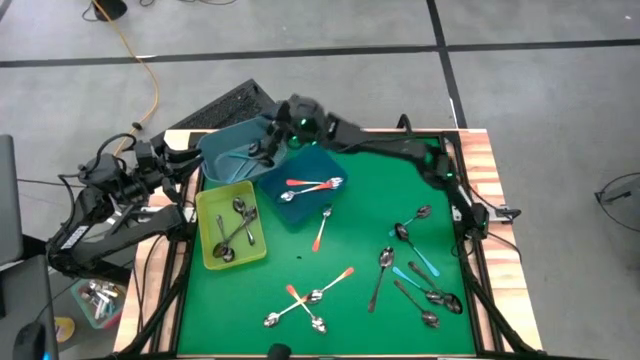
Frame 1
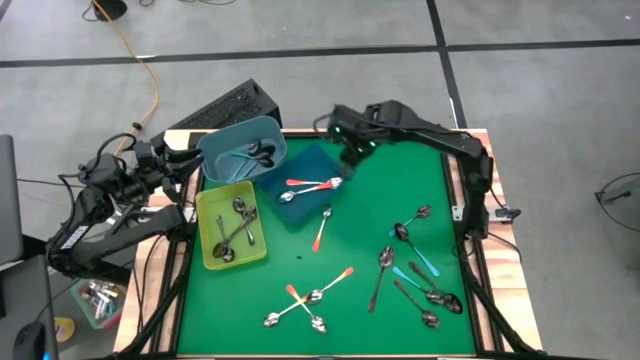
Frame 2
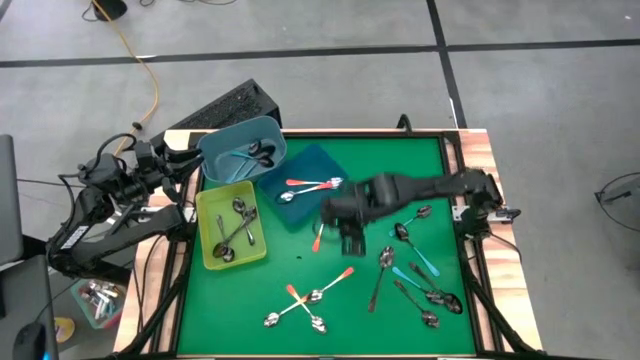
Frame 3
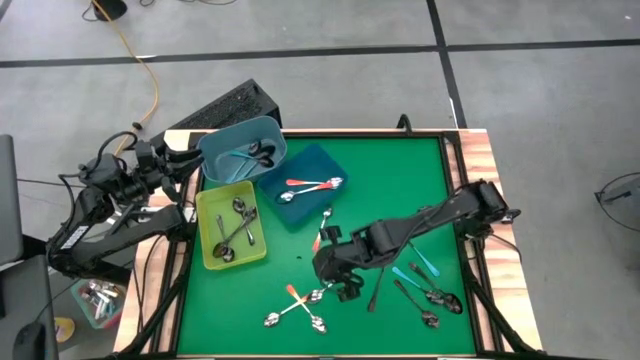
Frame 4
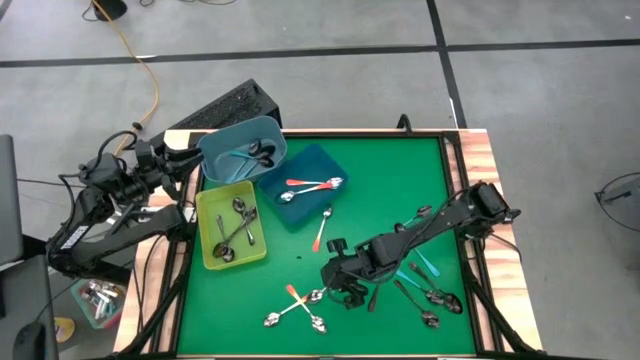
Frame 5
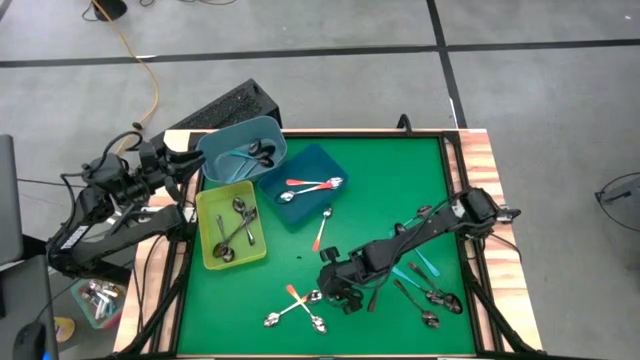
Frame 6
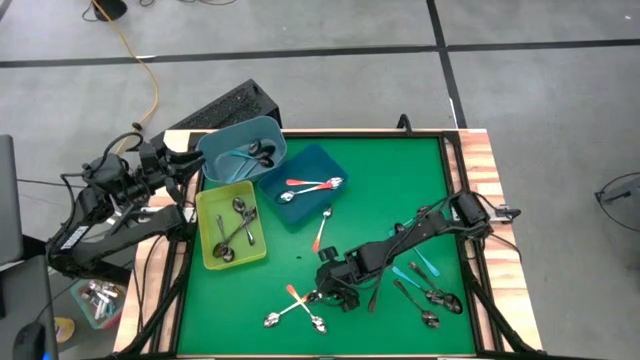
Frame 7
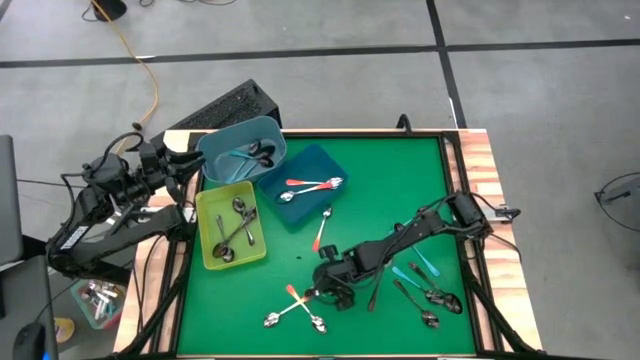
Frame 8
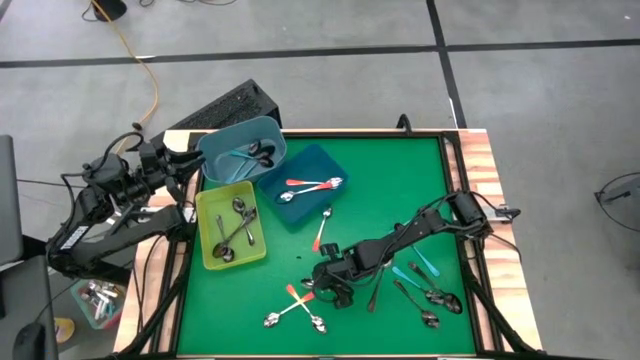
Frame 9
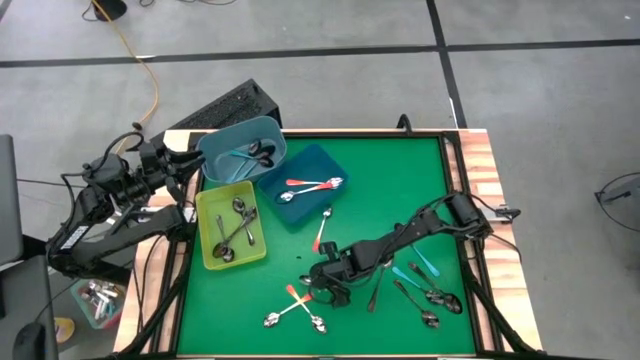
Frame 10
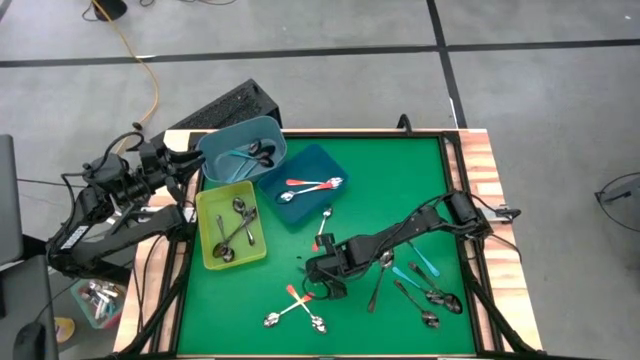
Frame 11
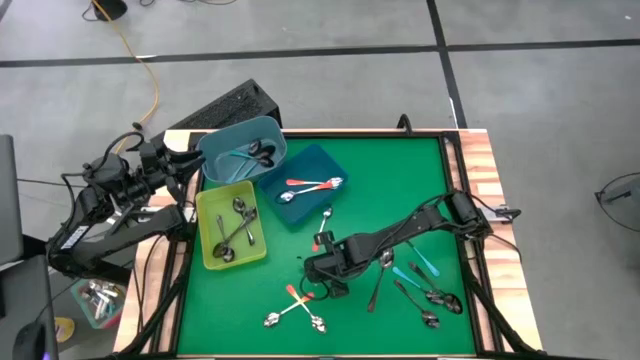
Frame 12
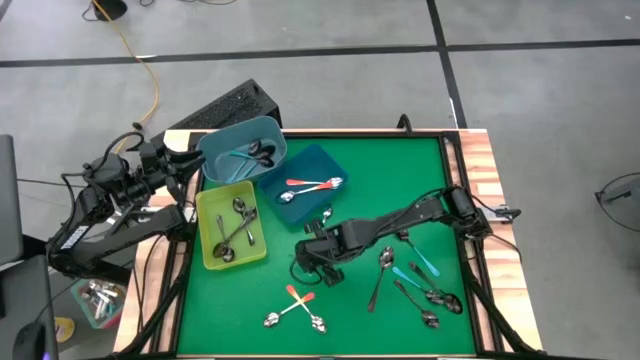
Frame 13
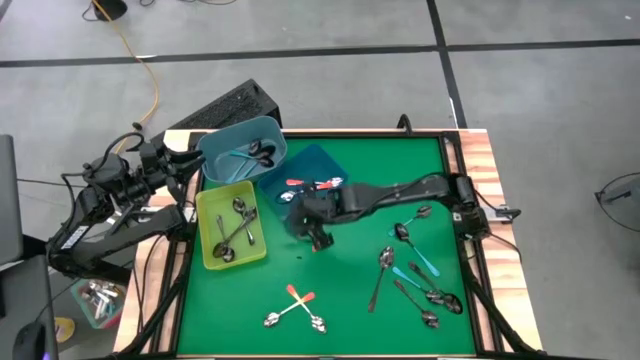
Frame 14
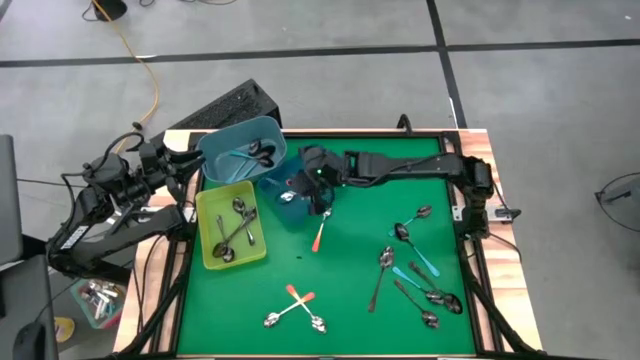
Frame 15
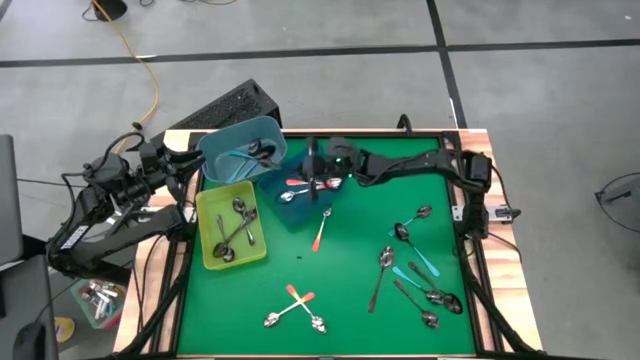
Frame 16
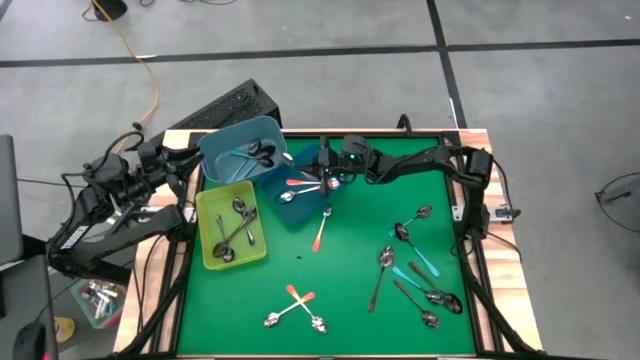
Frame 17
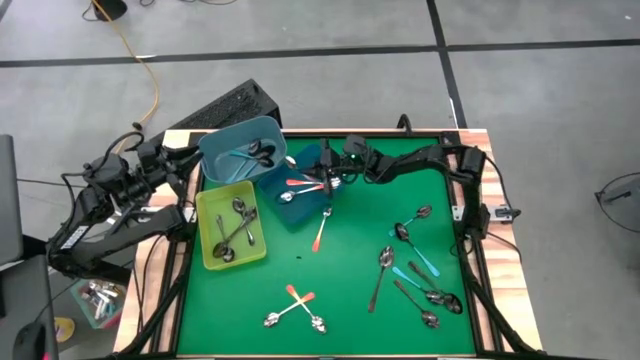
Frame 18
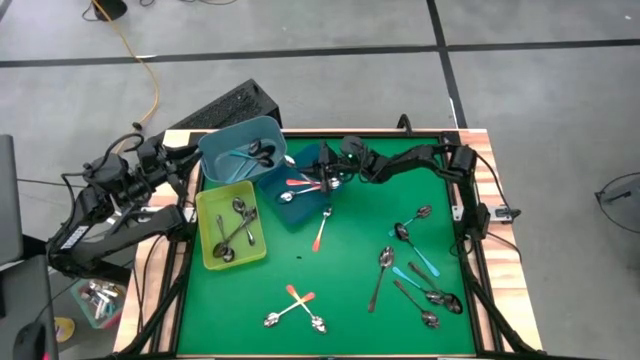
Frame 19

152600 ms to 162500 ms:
Task: Sort silverware by color (type)
Put the orange spoon into the blue bin

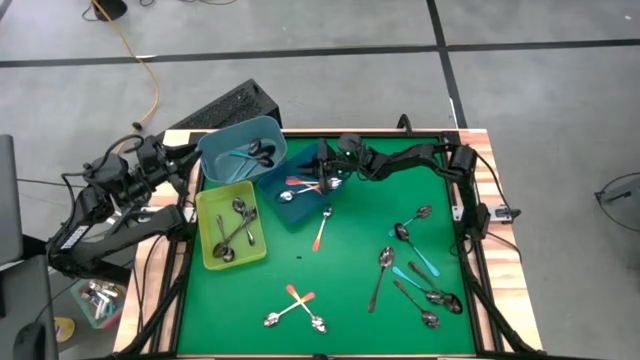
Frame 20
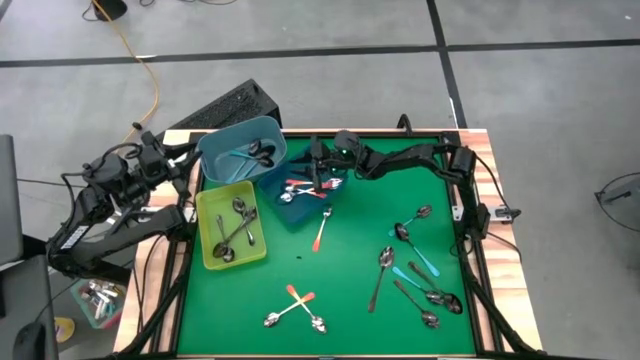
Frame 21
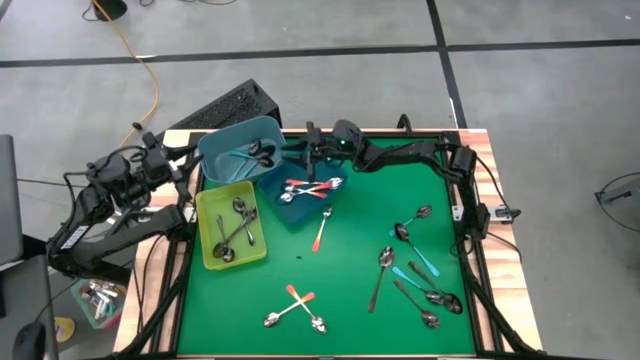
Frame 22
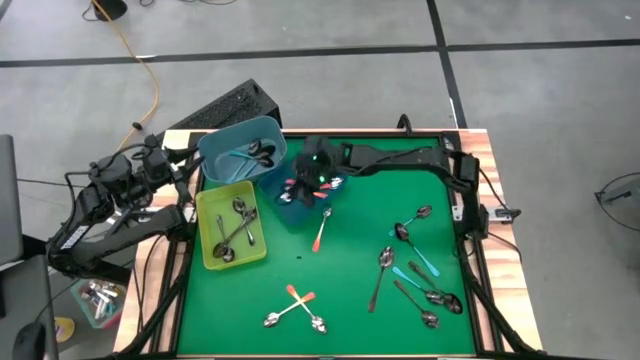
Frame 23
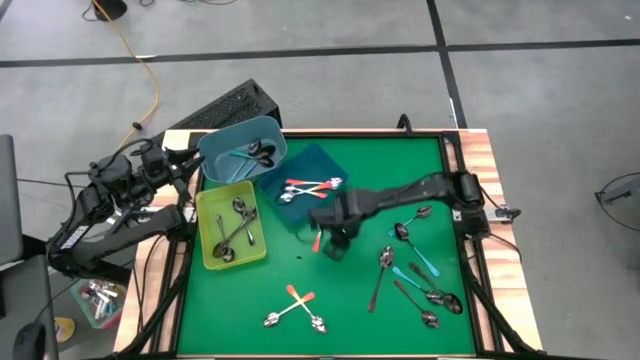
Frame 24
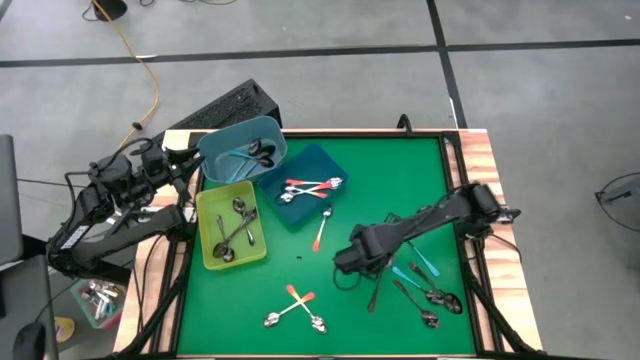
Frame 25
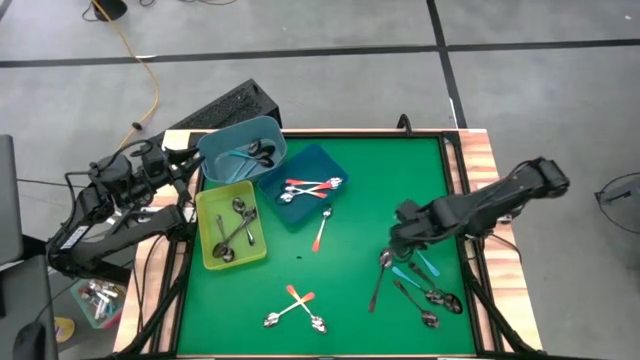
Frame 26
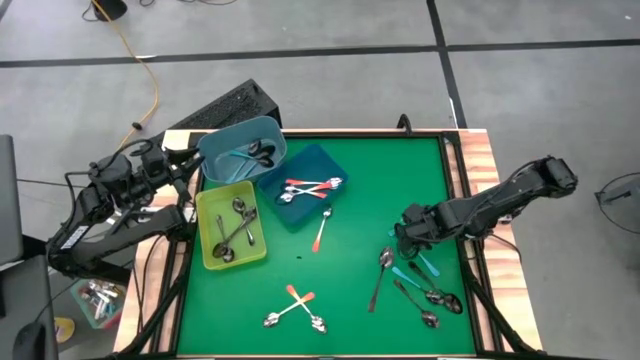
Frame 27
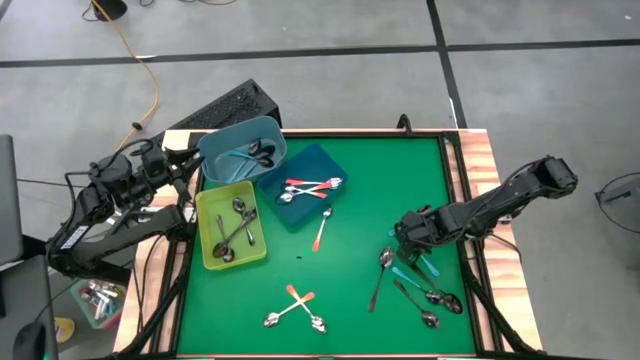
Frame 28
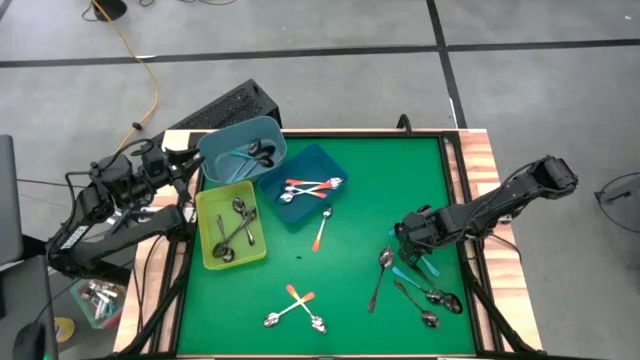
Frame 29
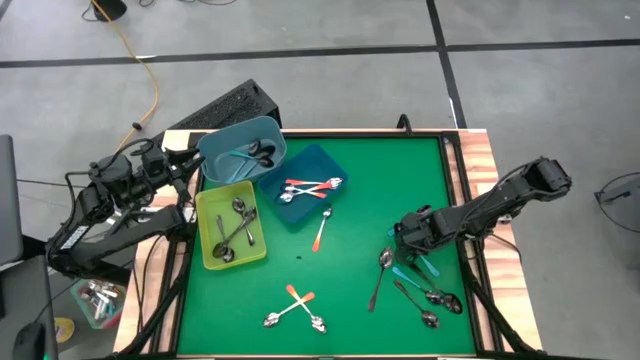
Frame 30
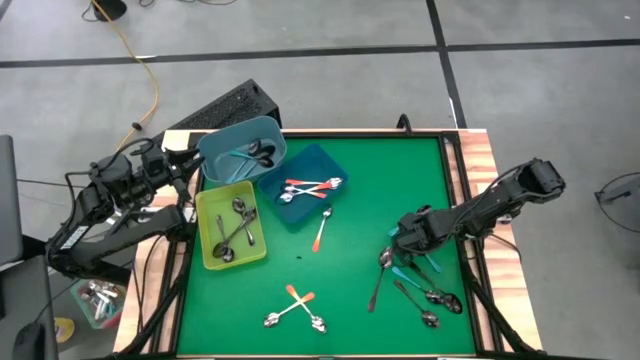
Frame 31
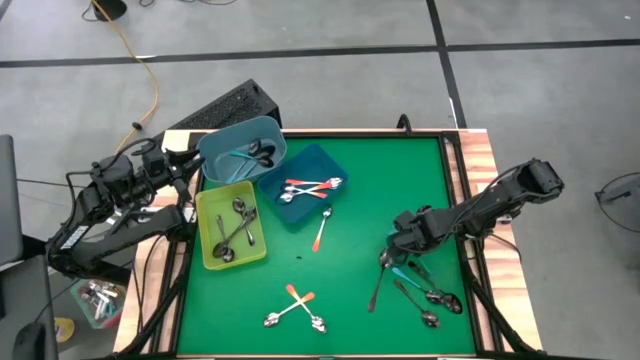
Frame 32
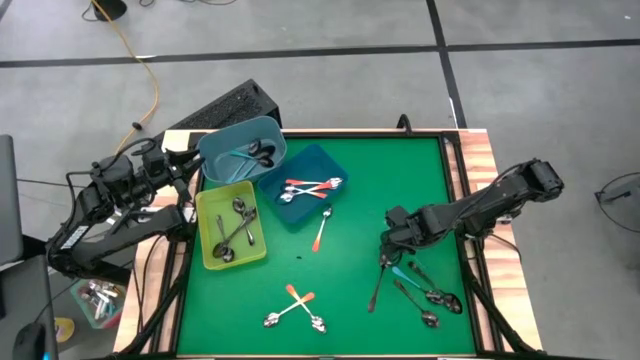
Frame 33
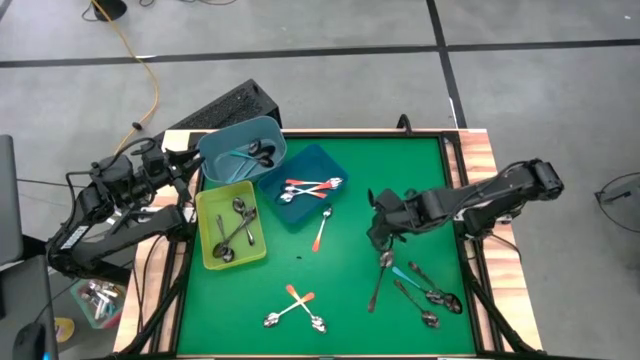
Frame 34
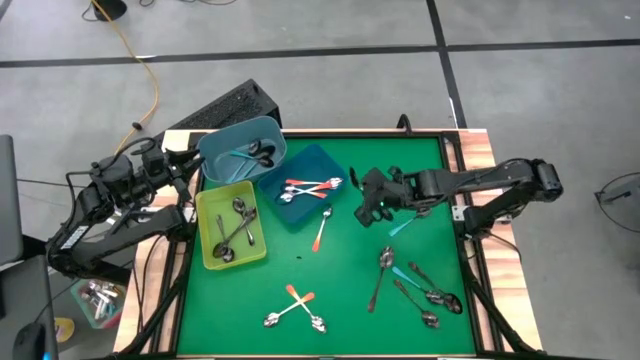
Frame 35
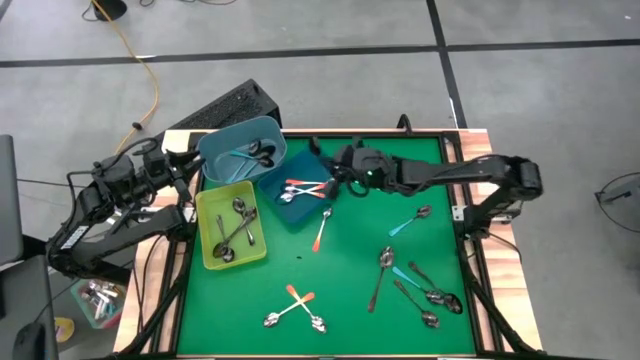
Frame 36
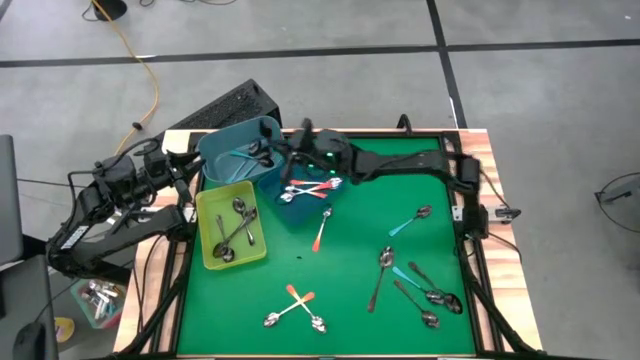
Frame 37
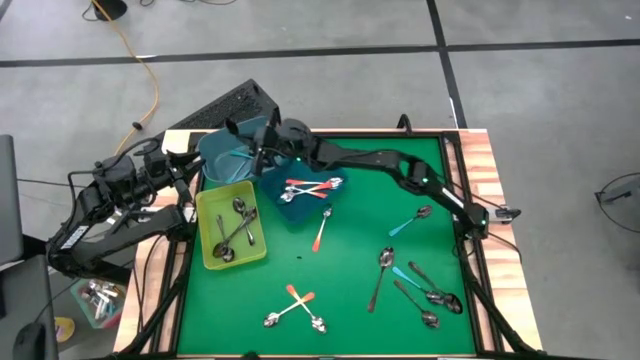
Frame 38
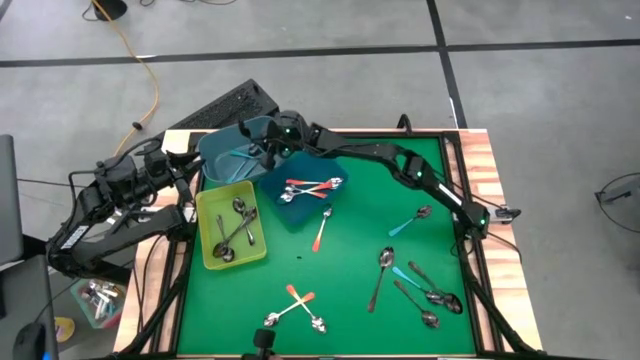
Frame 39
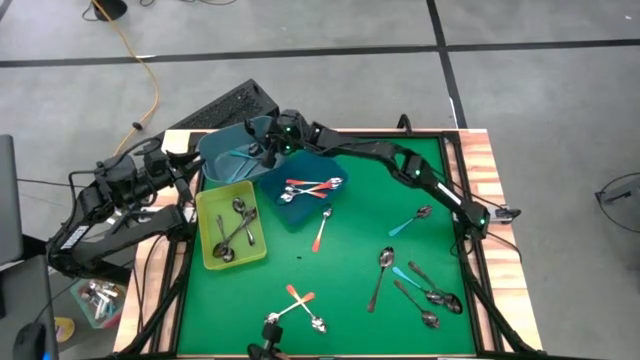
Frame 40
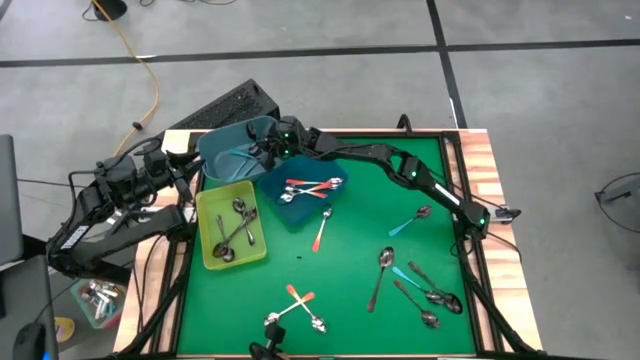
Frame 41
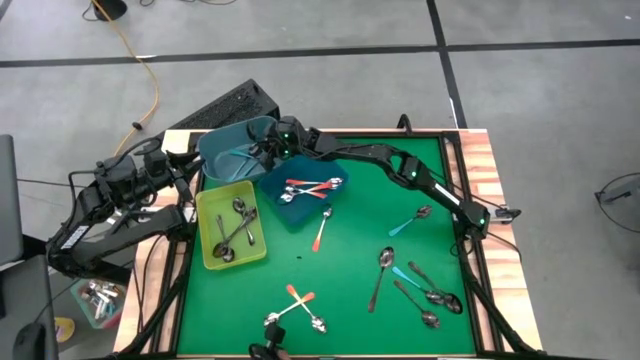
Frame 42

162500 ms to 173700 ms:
Put the blue spoon into the light blue bin
